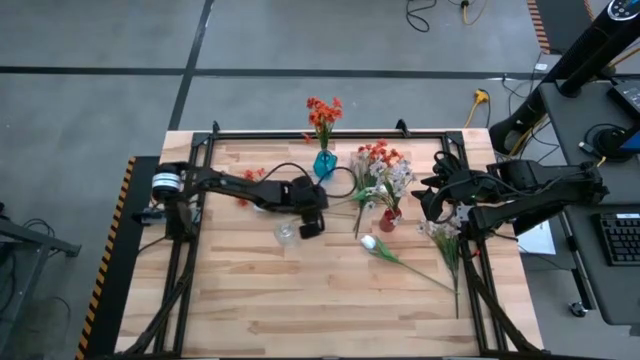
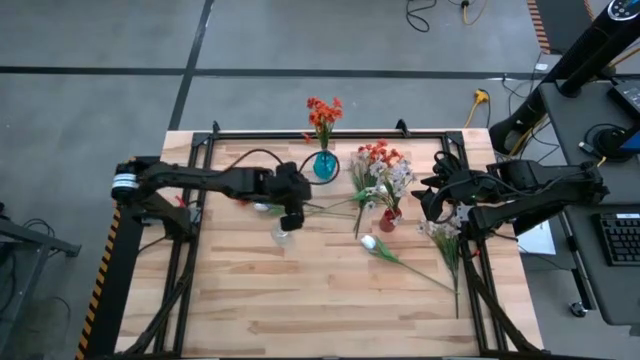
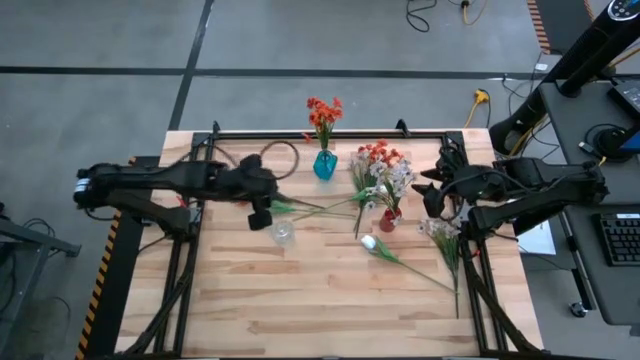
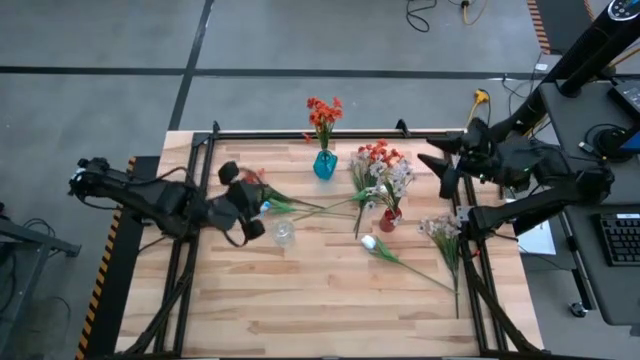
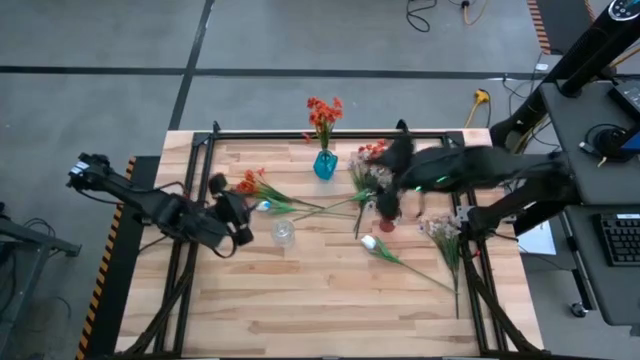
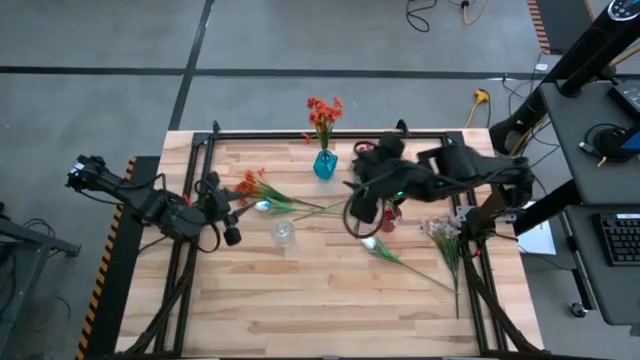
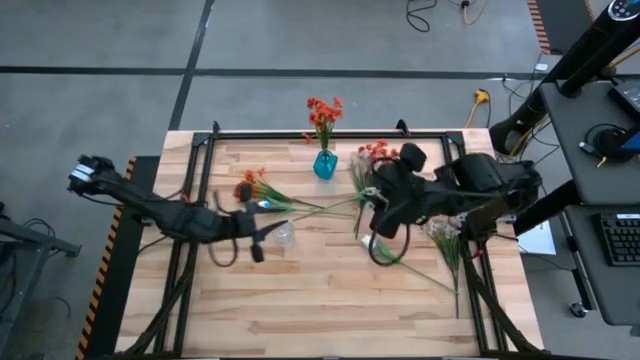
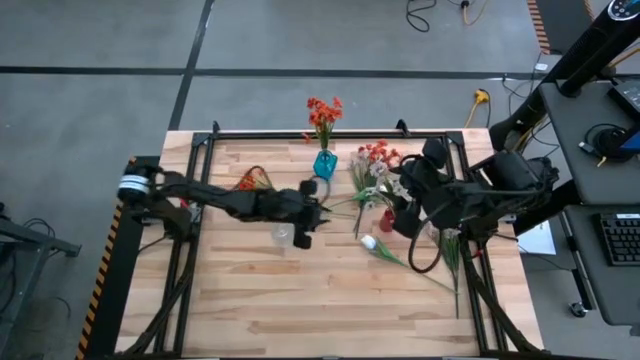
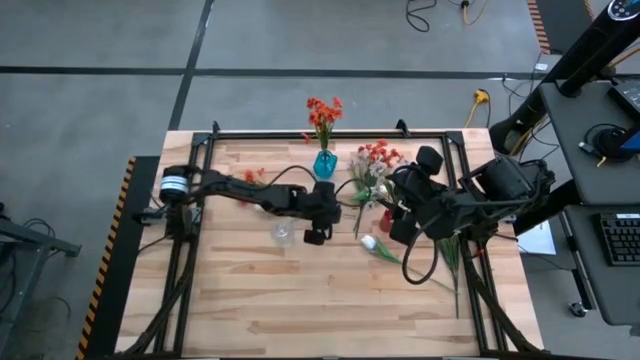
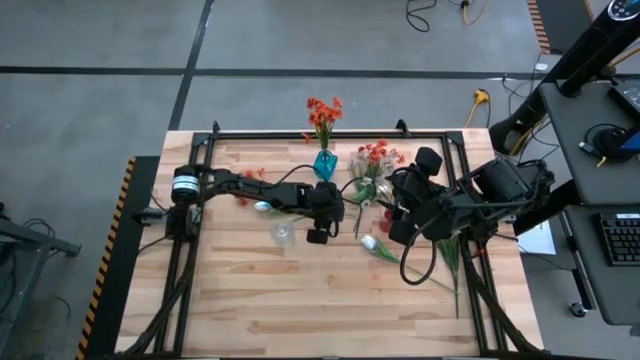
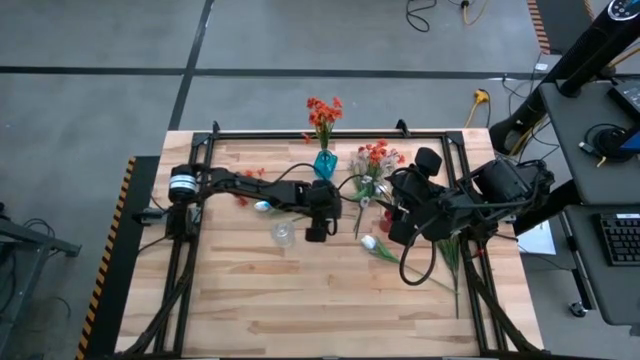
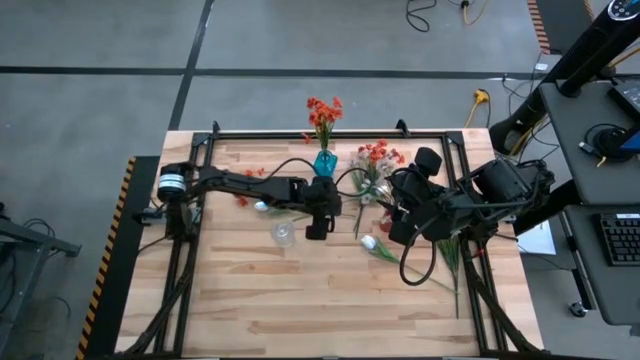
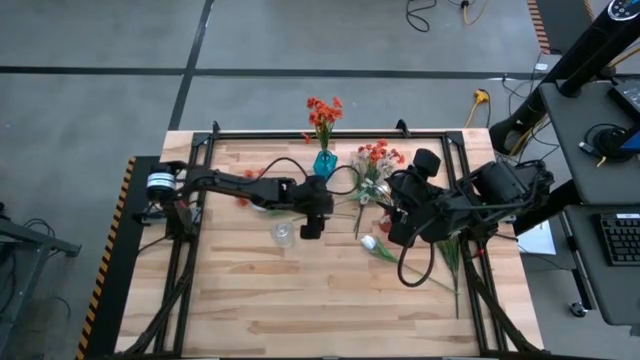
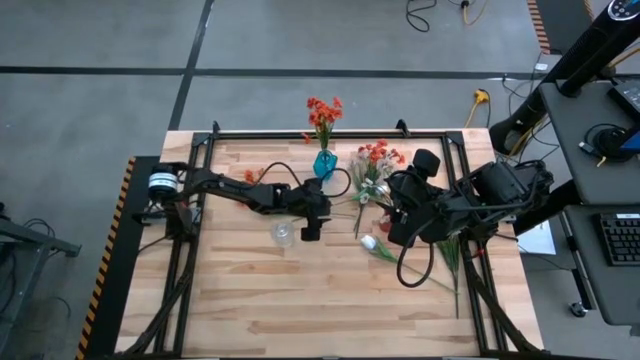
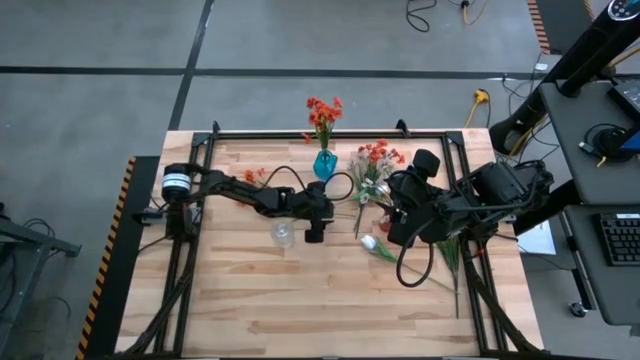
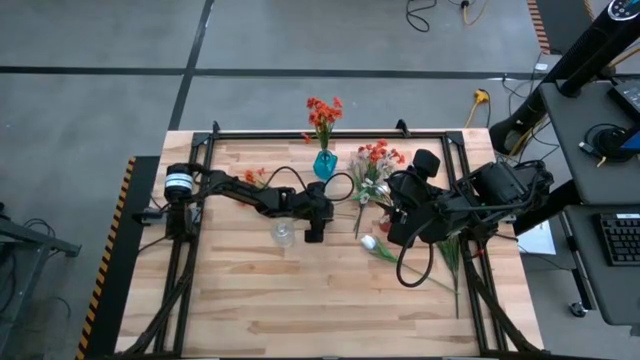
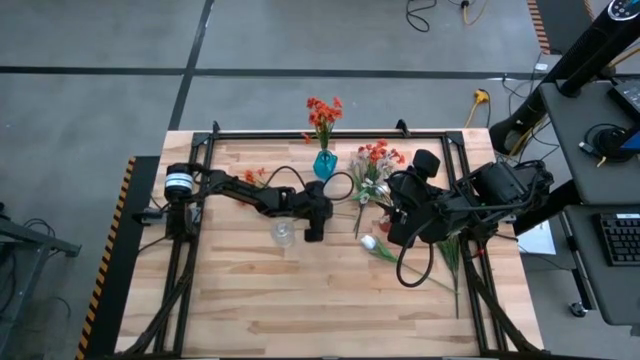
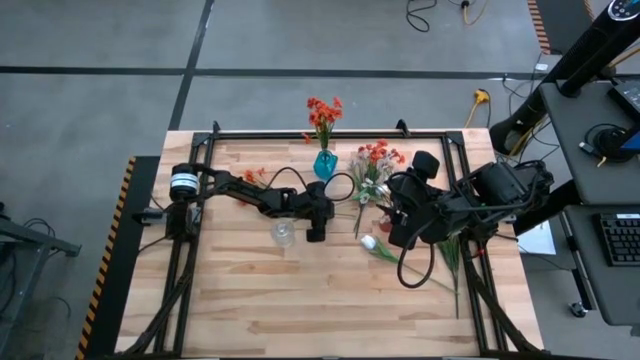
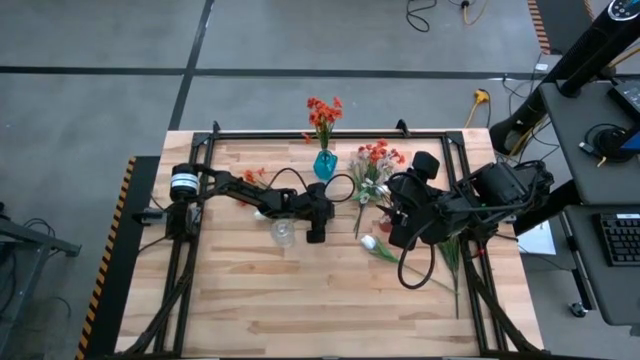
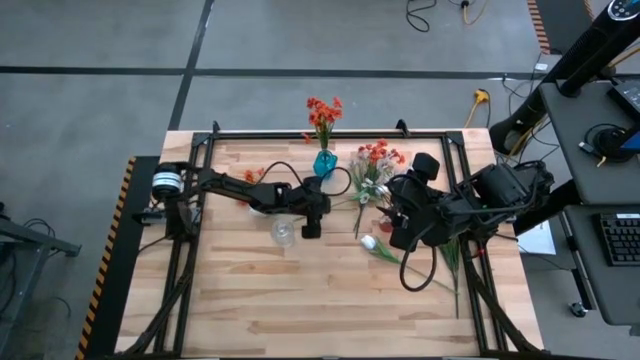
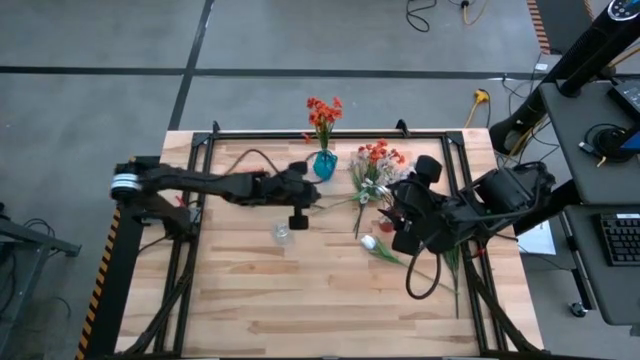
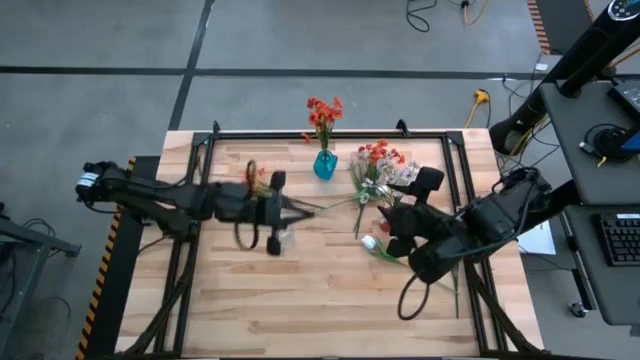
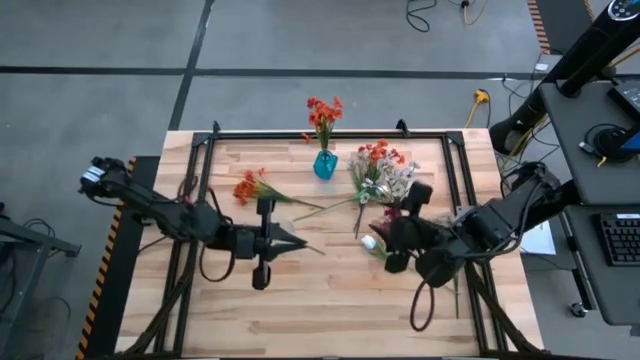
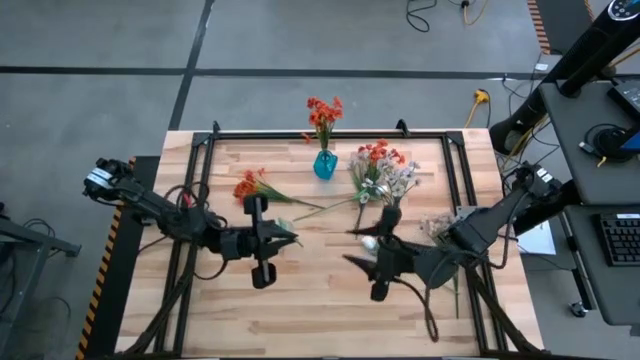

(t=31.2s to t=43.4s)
Task: Sort flowers into vase by color
Put the top left white flower into the transparent vase

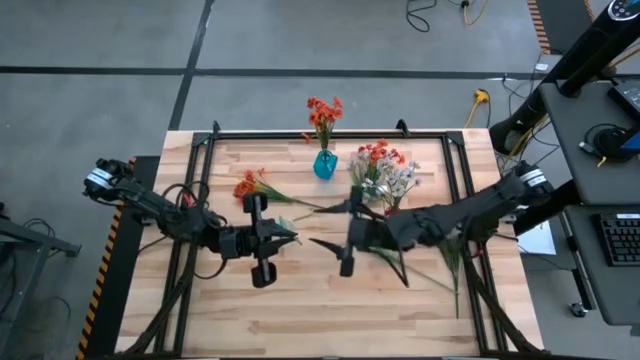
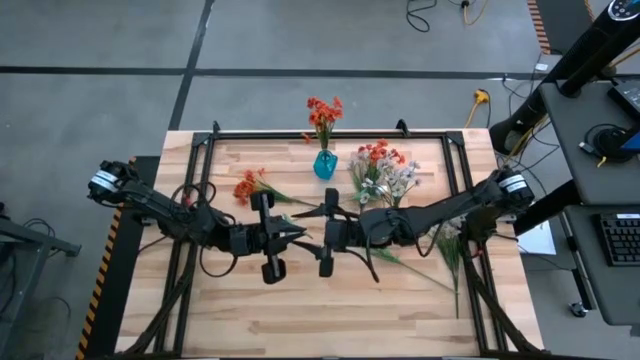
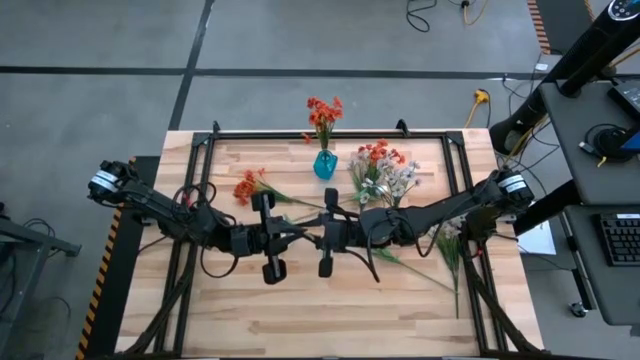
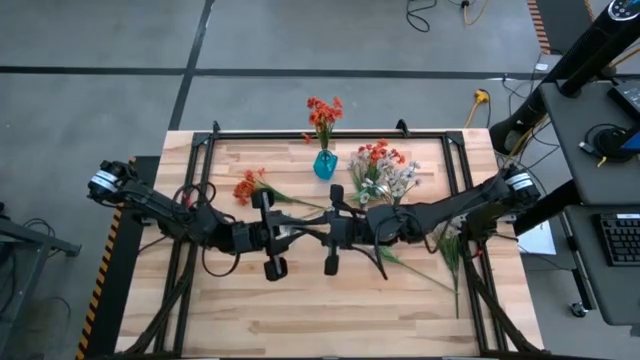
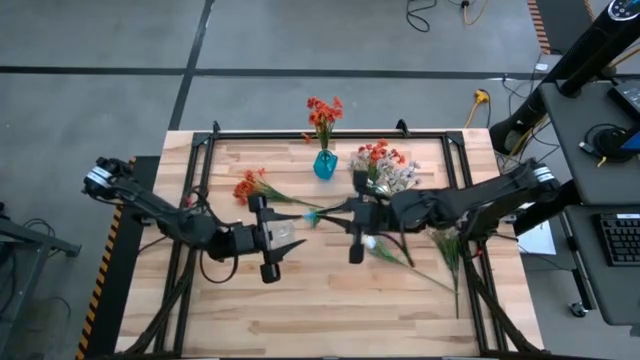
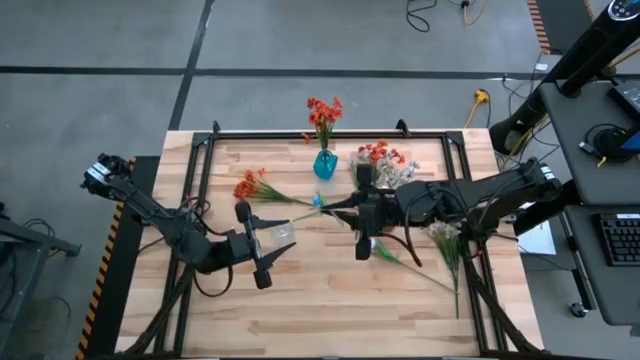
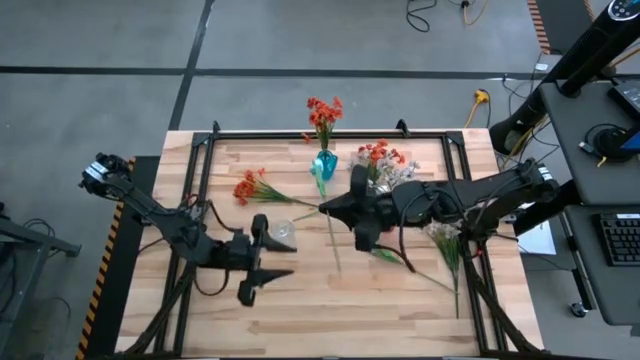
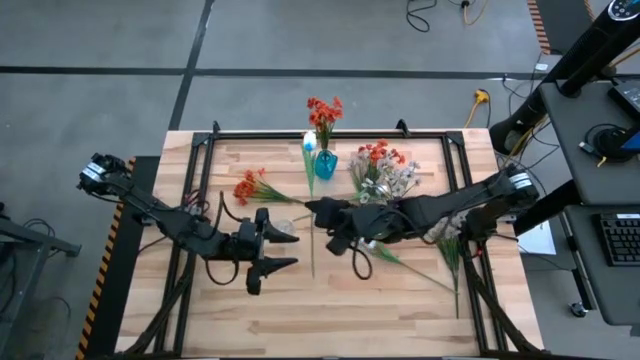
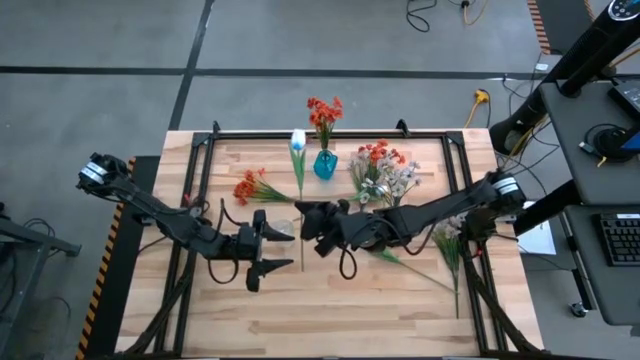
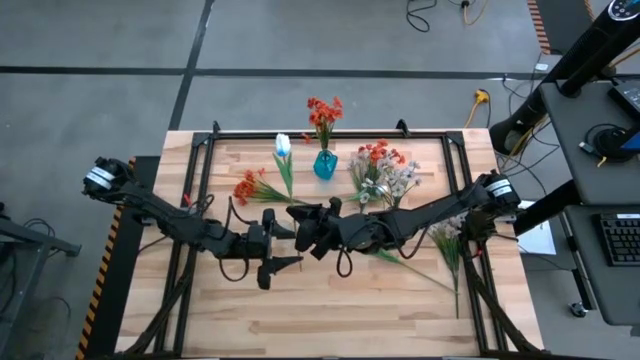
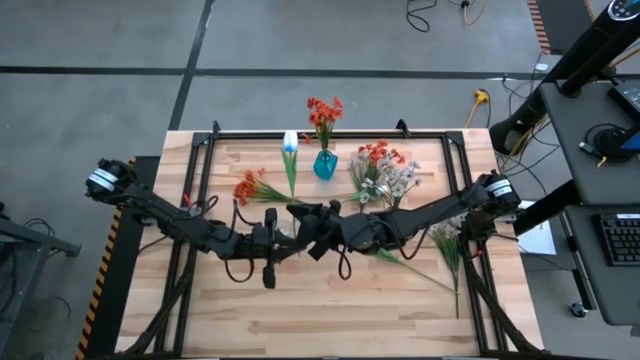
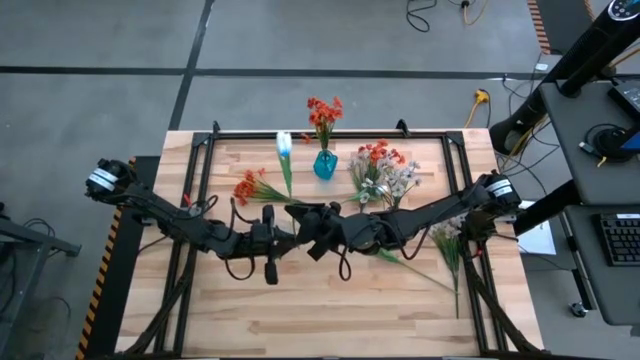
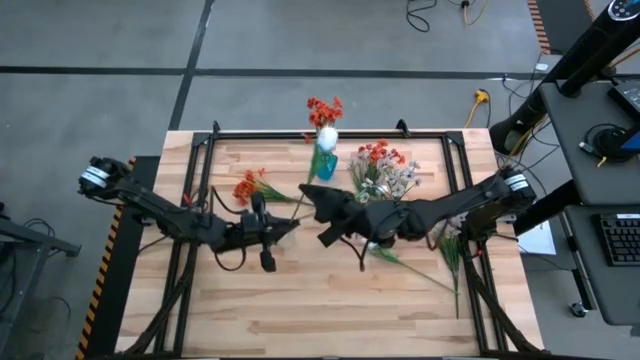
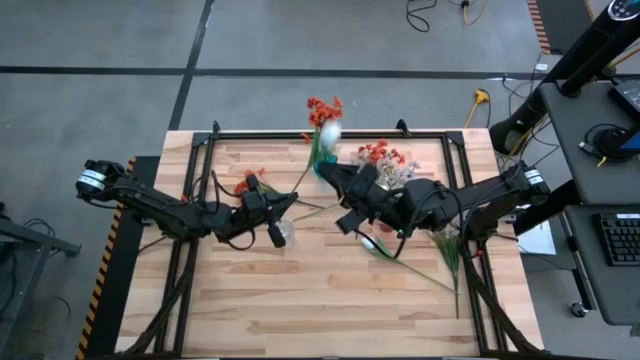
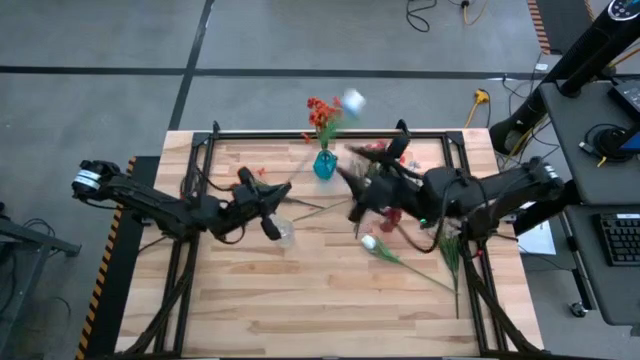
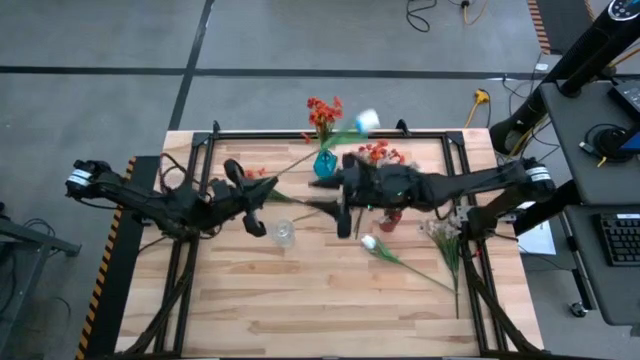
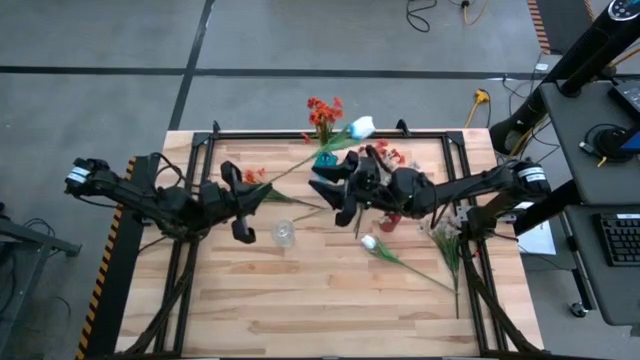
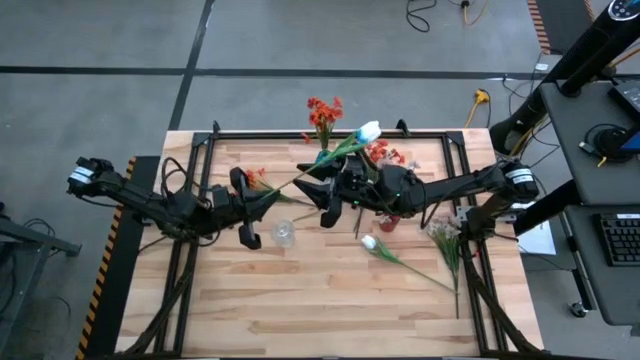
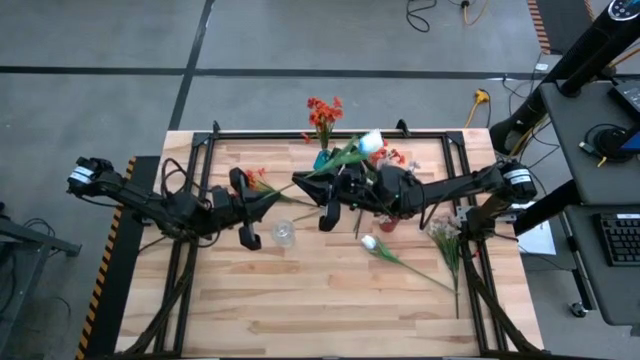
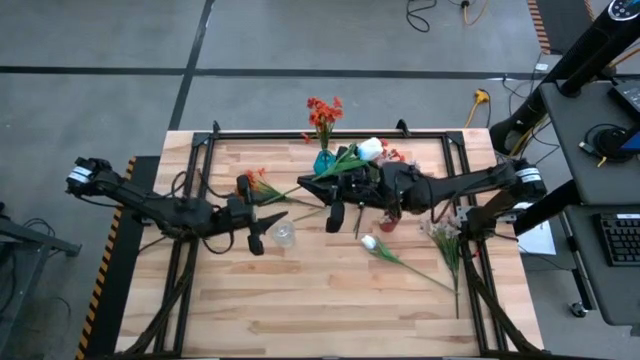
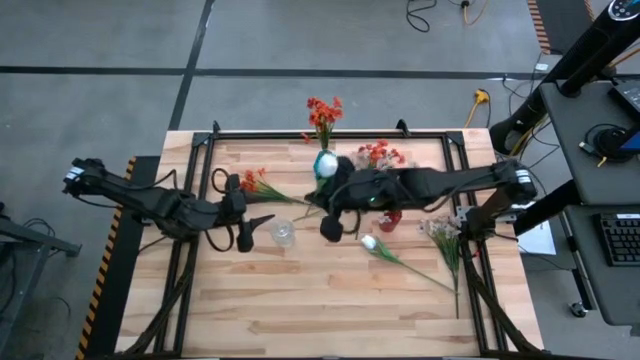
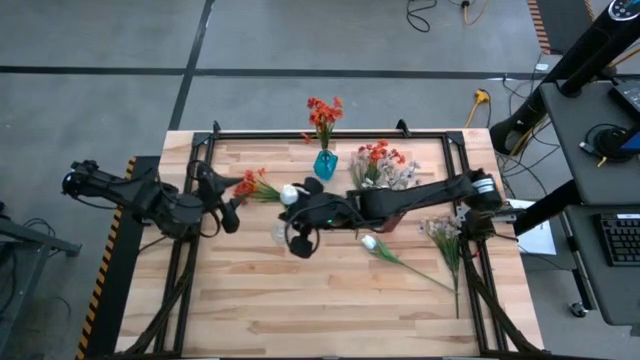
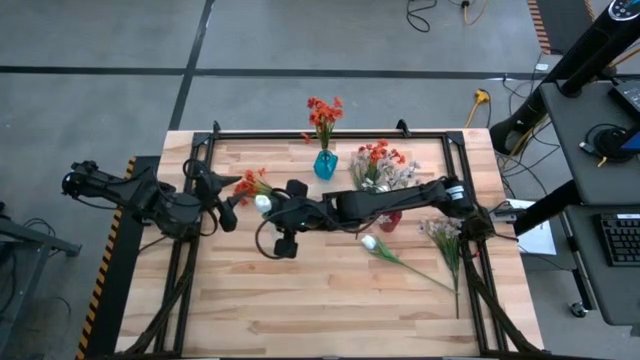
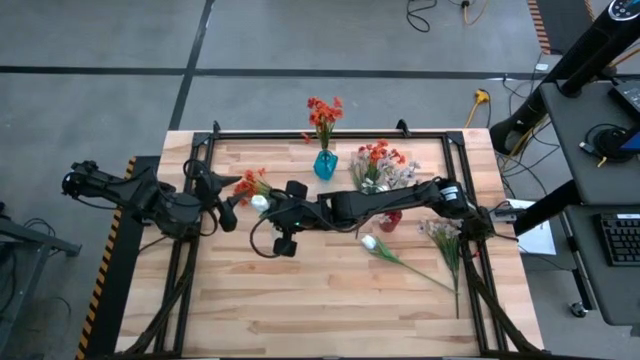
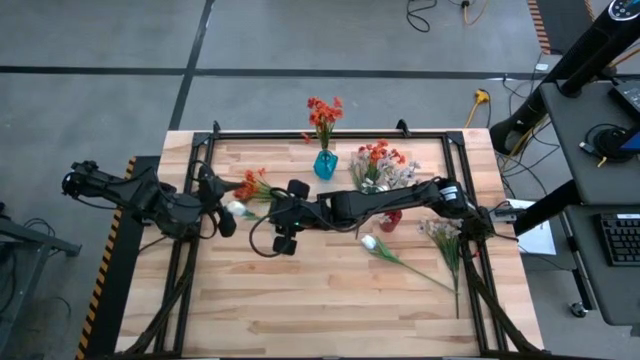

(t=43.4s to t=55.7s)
Put the top left white flower into the transparent vase
